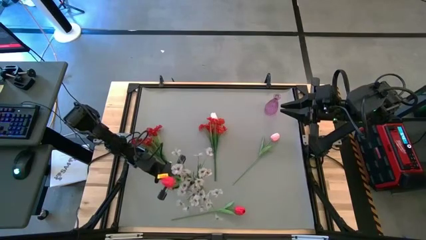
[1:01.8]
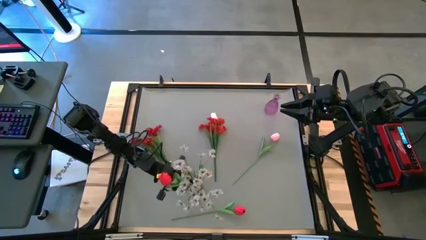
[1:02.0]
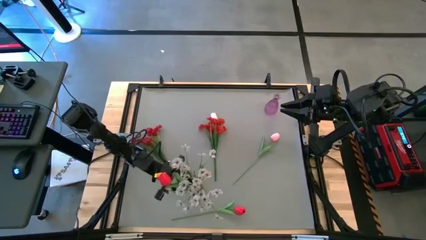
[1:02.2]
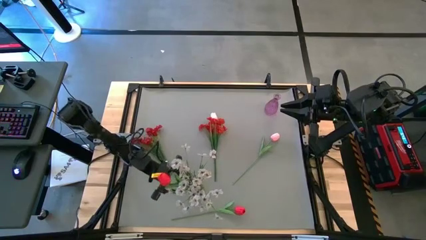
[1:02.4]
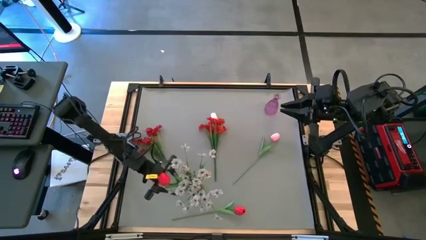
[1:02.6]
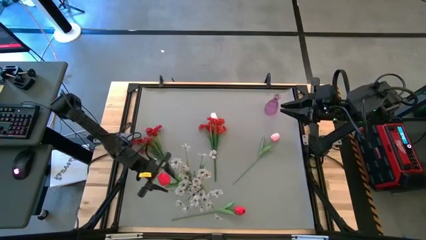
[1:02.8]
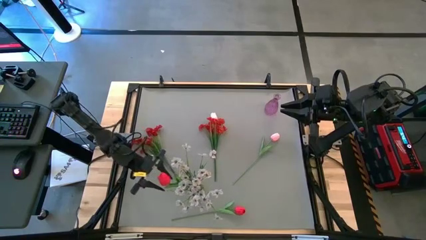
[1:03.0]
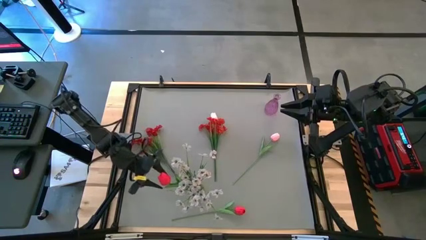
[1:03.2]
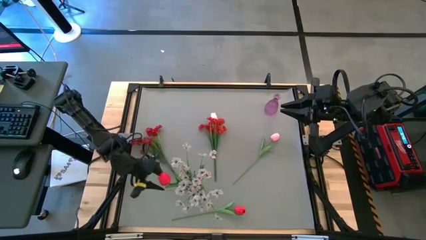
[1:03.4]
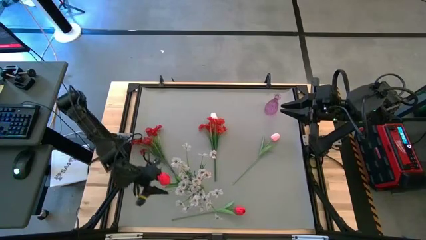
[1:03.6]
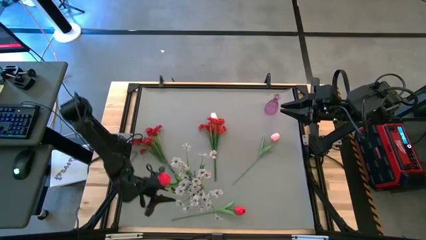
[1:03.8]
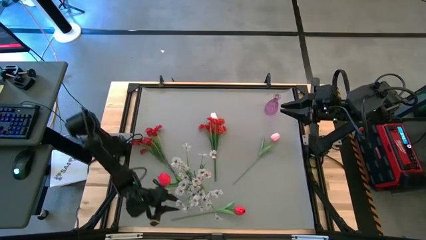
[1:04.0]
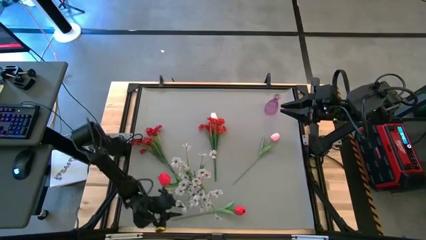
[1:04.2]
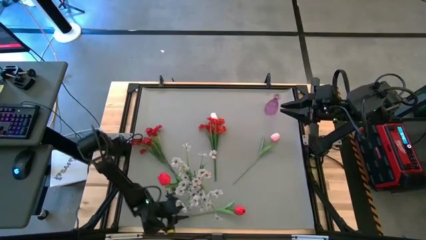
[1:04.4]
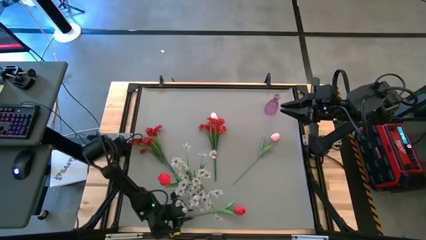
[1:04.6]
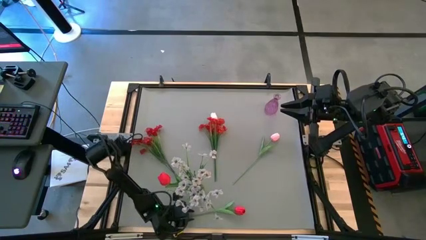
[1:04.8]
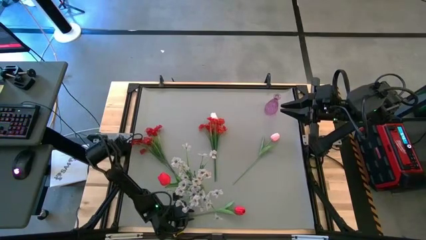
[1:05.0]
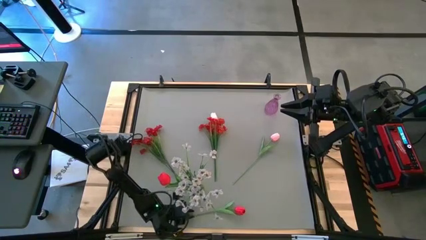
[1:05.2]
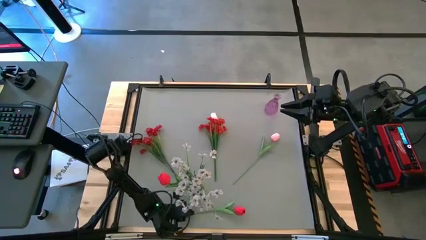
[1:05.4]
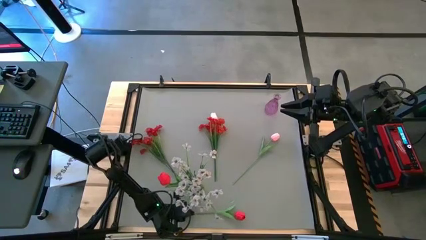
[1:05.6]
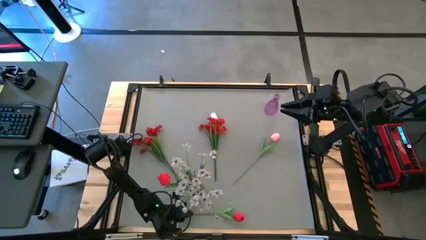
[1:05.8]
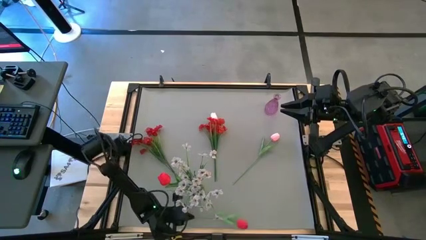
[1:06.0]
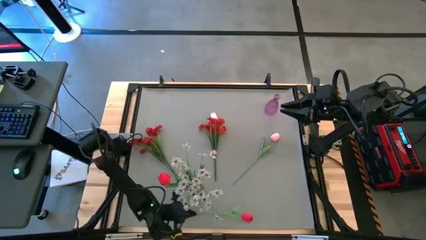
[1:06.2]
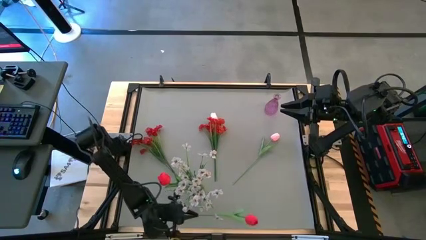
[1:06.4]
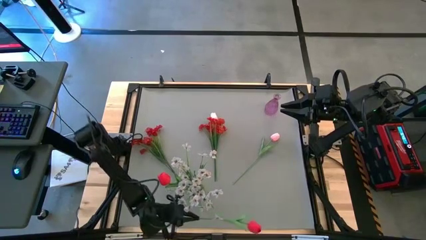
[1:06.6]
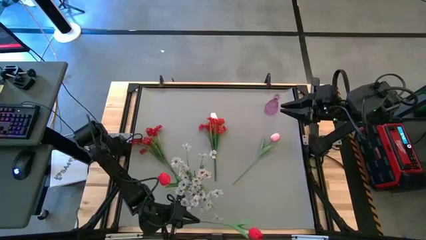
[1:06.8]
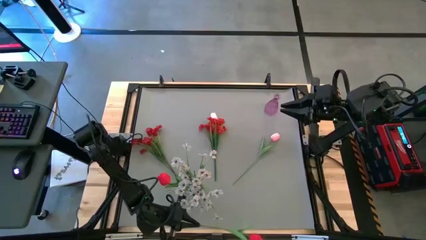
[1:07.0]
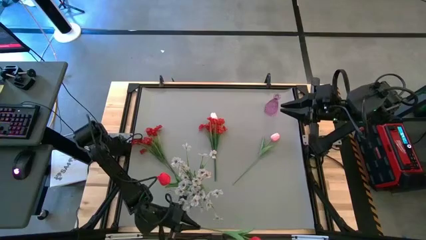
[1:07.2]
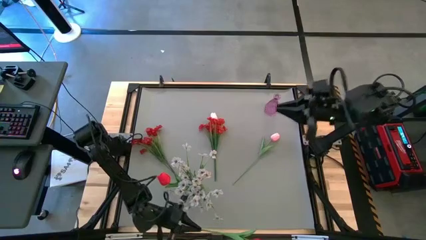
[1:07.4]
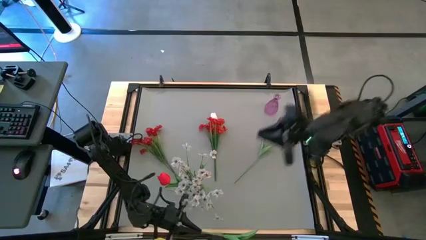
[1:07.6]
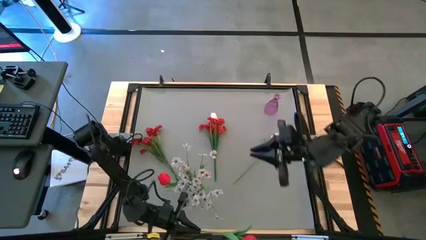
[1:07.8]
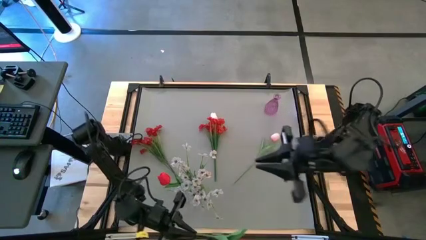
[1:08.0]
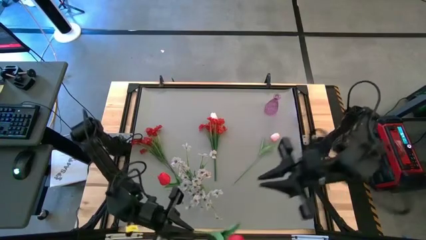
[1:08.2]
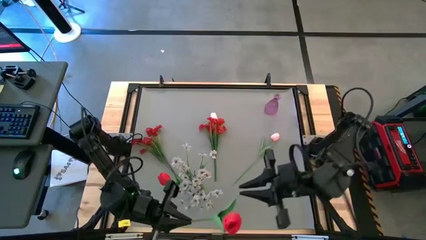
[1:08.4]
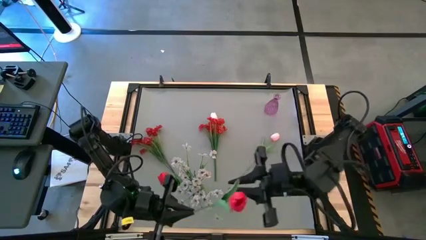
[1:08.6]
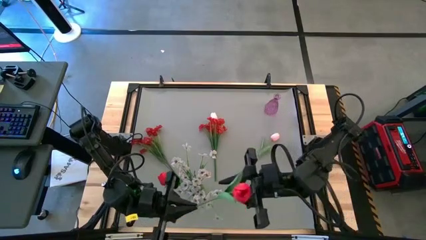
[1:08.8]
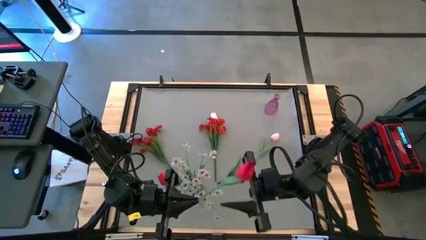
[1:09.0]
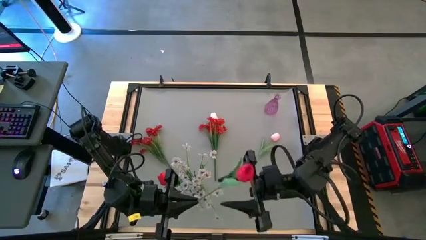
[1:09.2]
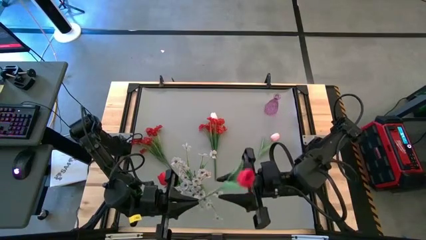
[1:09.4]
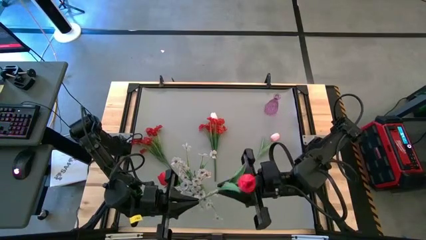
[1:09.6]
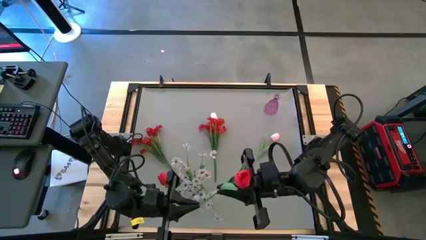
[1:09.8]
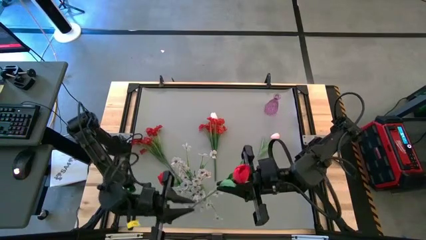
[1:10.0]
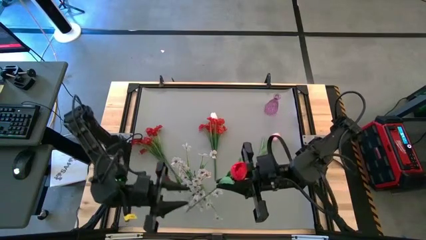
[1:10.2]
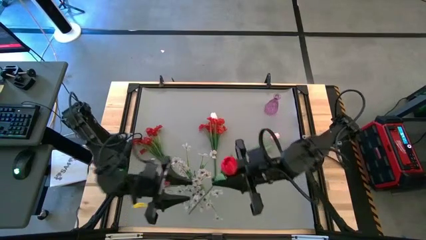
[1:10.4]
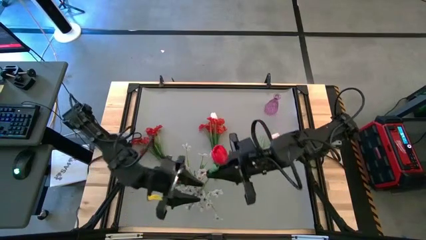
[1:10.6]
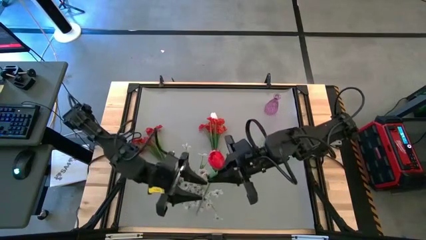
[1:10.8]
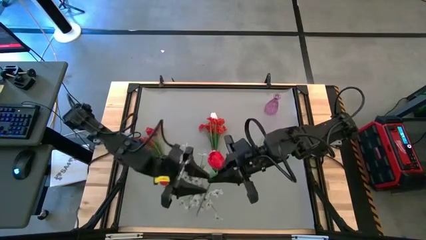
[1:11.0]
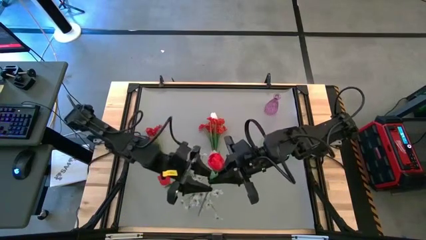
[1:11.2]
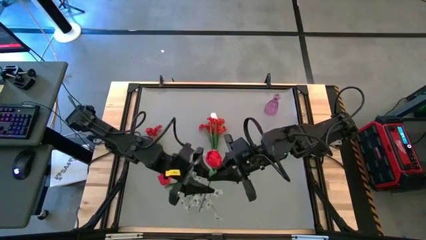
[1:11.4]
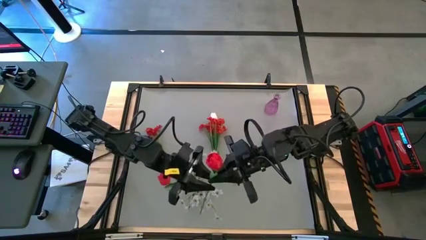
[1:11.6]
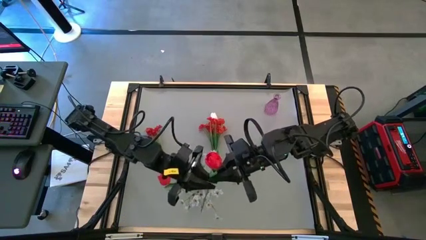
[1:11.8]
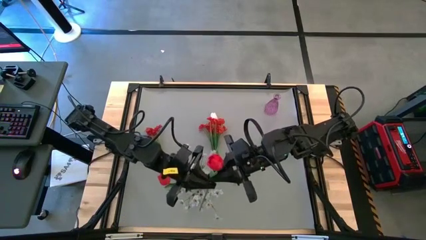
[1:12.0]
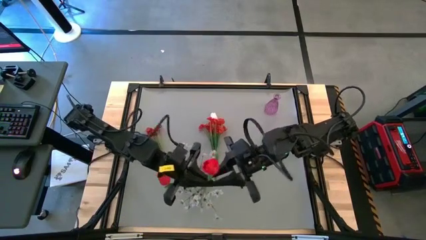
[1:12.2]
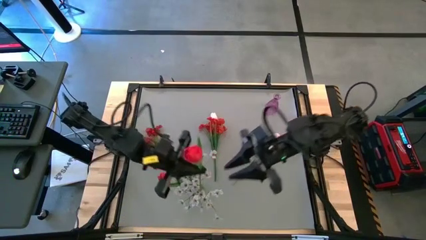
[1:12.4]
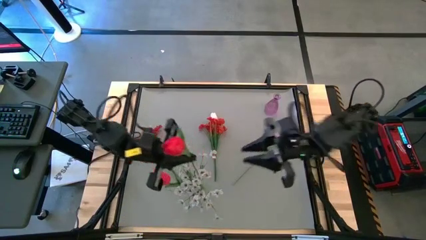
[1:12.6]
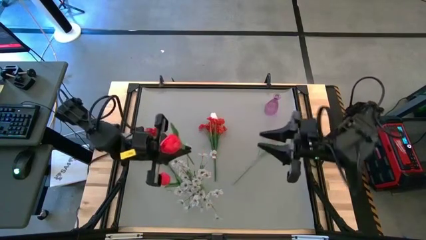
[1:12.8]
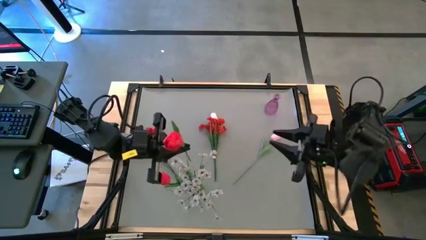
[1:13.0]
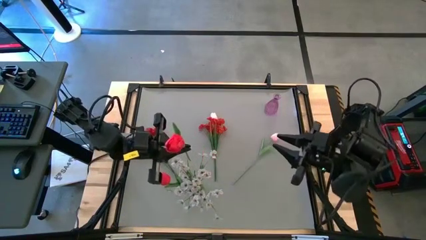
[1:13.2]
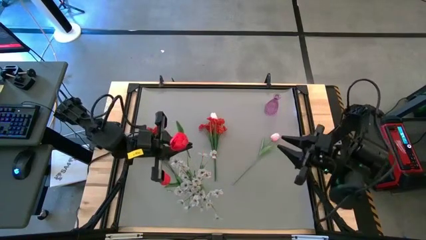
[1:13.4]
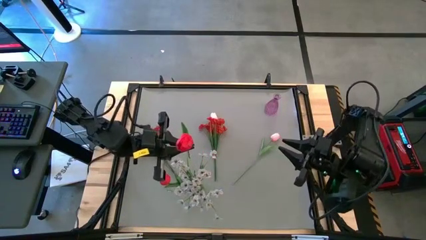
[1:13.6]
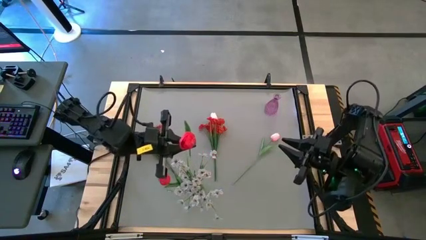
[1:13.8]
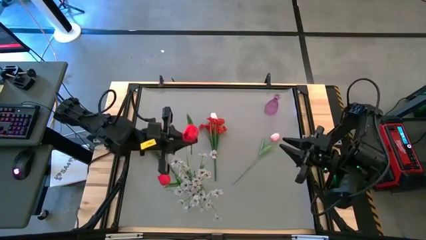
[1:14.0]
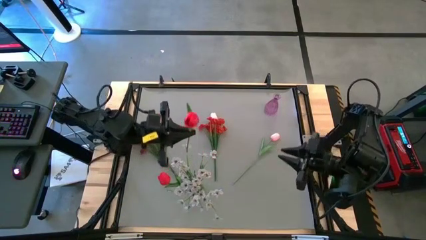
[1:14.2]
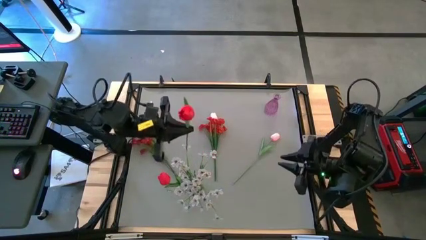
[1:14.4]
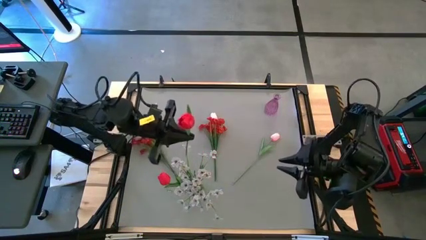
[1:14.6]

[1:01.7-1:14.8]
Task: Sort flowers into vase by color
Put the red flower into the green vase

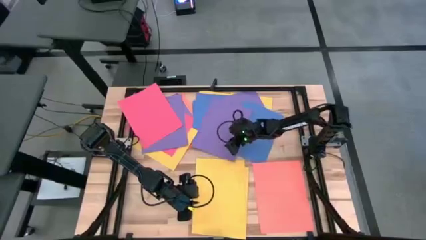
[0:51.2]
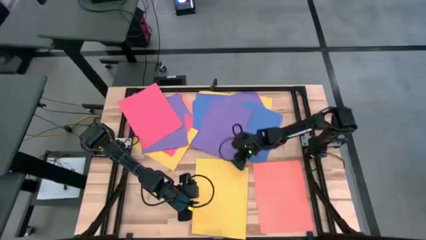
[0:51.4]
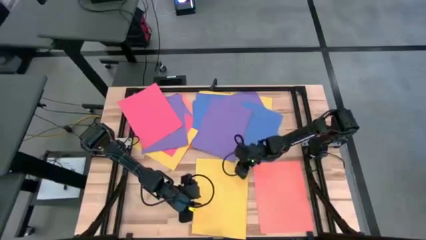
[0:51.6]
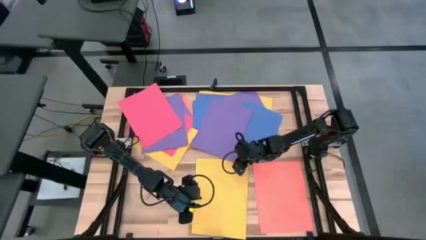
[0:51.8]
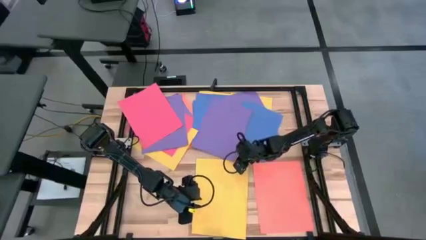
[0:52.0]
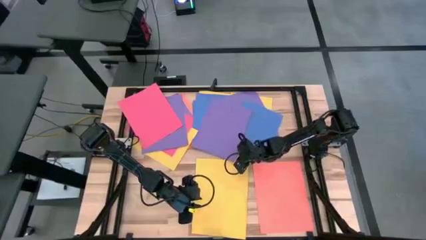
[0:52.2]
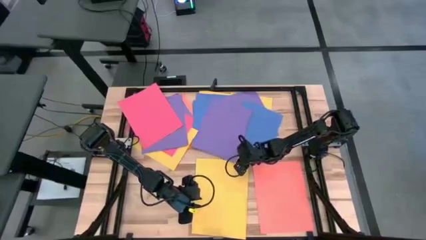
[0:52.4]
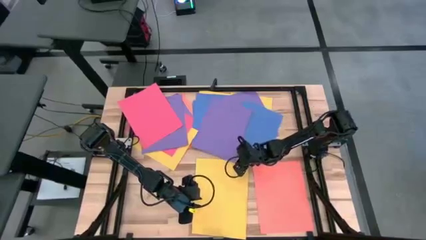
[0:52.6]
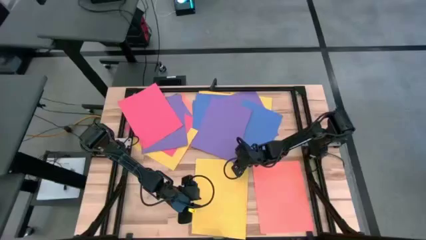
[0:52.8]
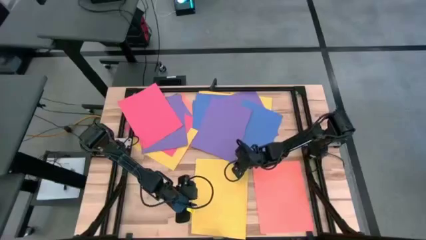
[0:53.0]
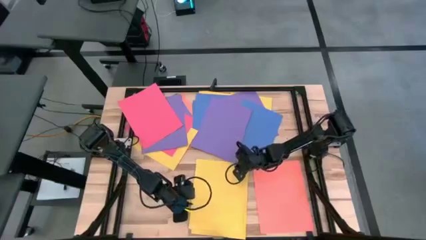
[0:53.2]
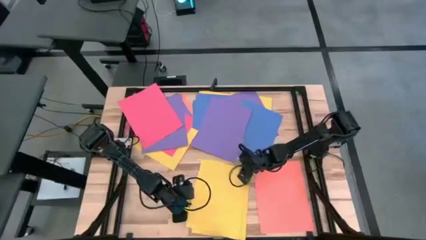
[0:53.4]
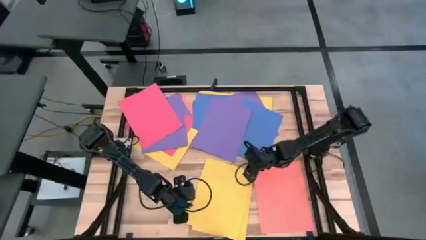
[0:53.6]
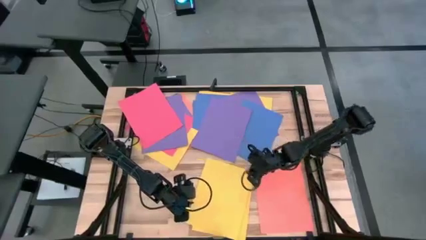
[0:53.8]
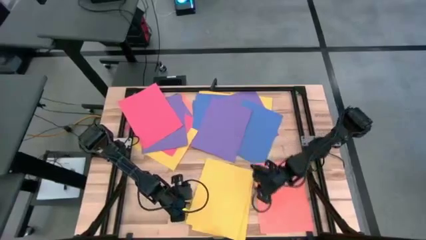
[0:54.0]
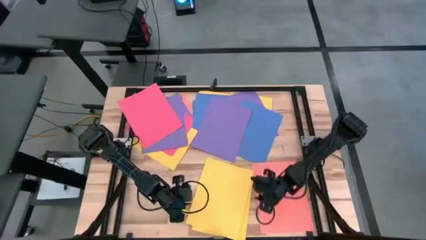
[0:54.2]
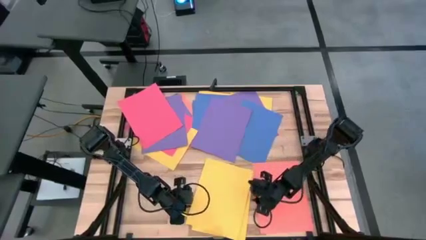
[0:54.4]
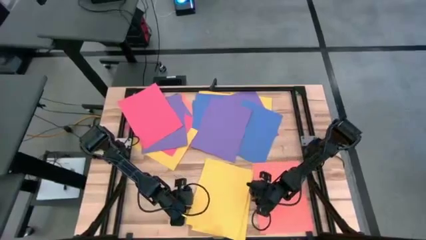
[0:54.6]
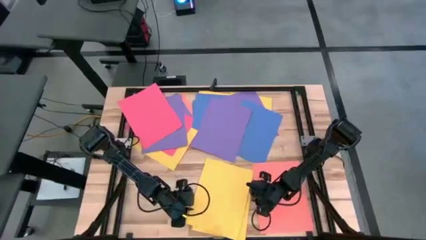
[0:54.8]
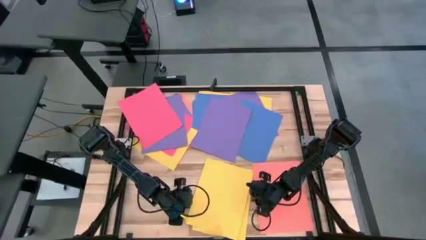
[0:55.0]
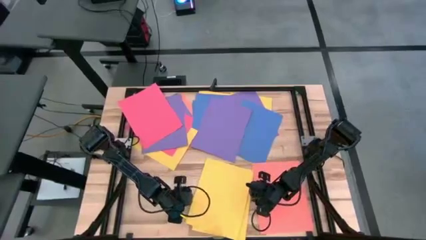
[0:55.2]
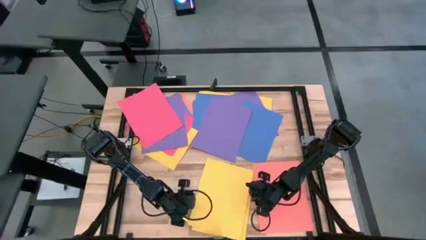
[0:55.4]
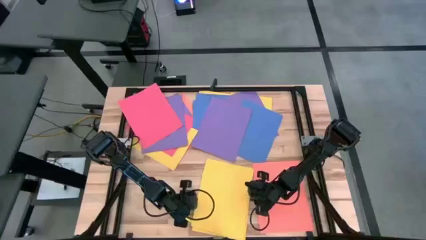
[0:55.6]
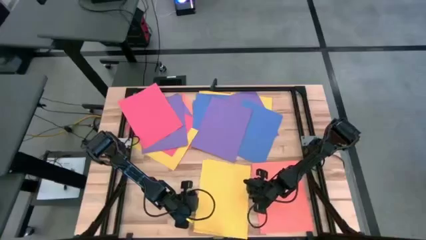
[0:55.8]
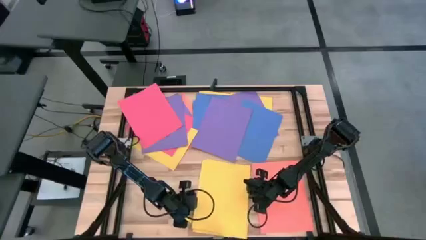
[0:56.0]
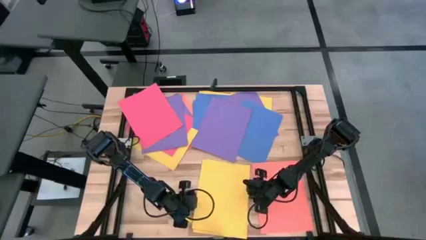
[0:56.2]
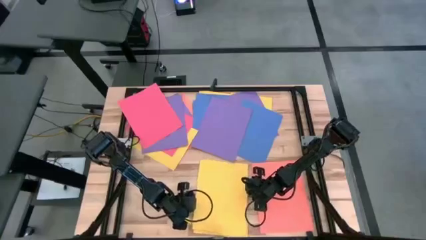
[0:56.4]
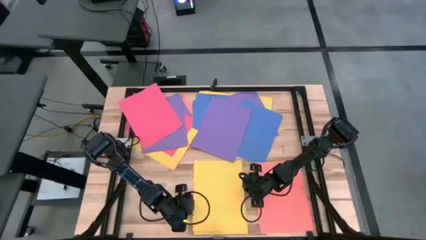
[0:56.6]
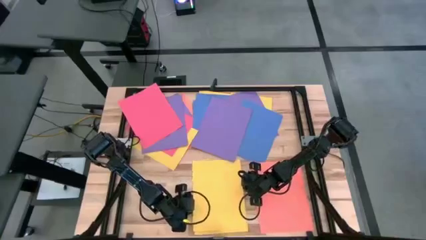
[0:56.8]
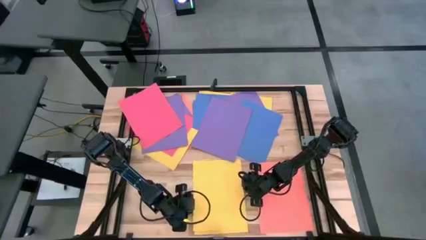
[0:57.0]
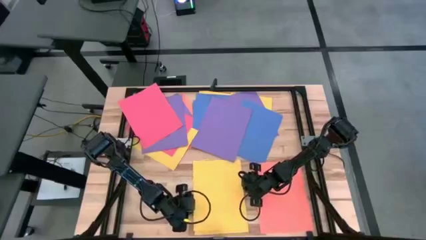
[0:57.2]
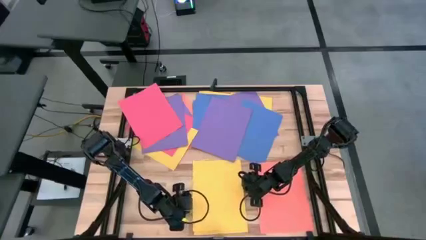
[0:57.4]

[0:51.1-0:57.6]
Task: Organize paper
Adjust the stacked yellow papers
